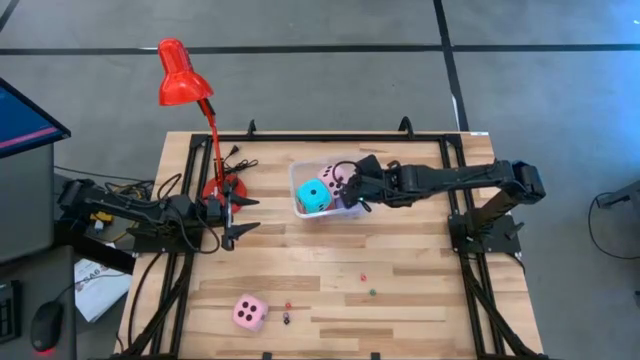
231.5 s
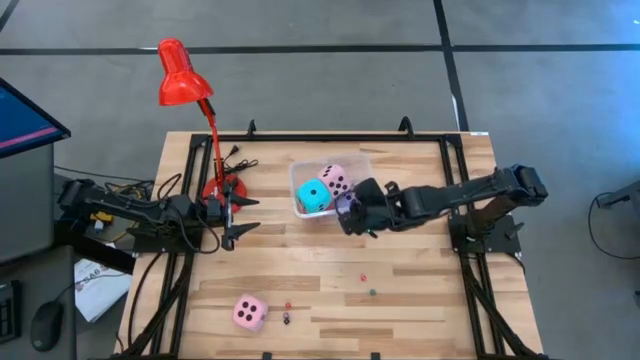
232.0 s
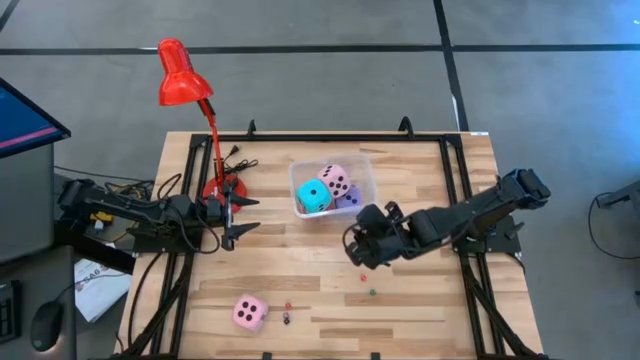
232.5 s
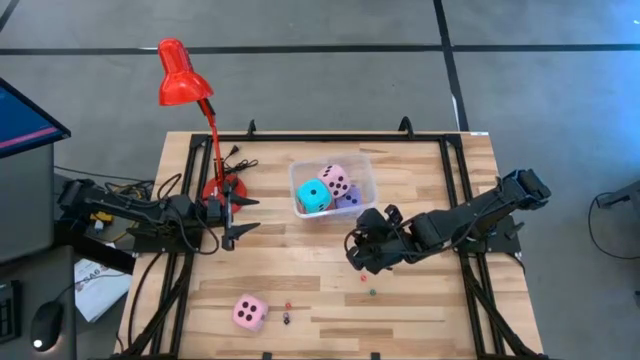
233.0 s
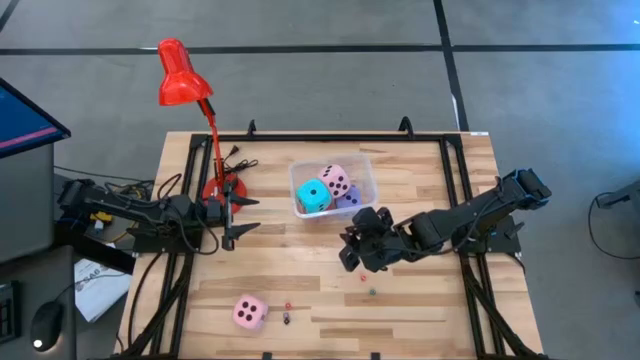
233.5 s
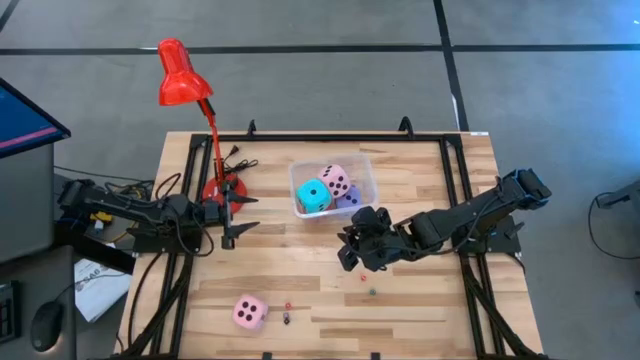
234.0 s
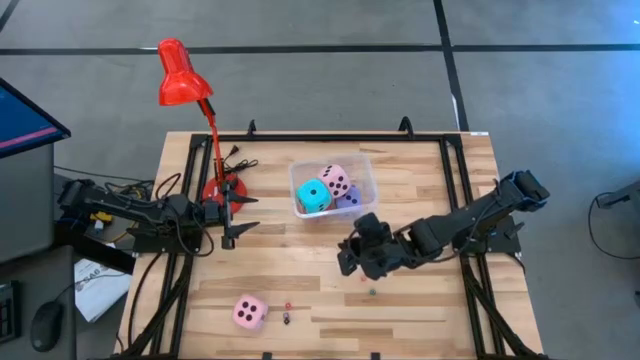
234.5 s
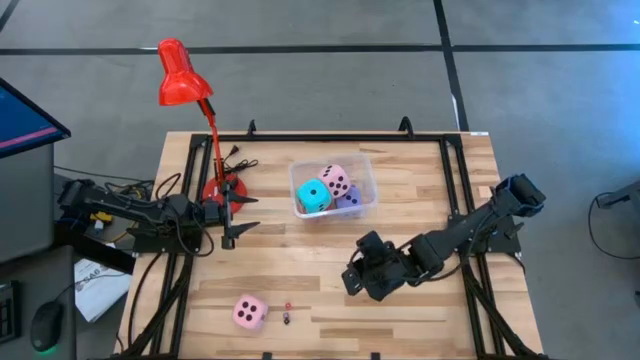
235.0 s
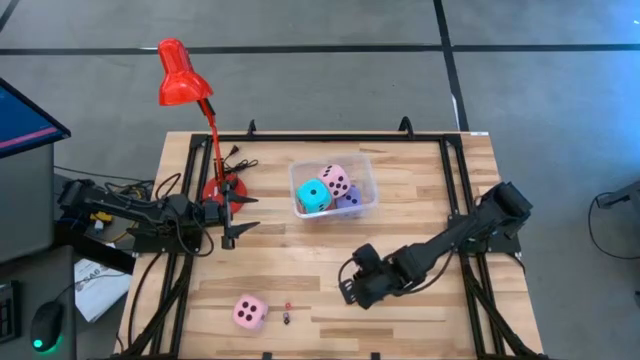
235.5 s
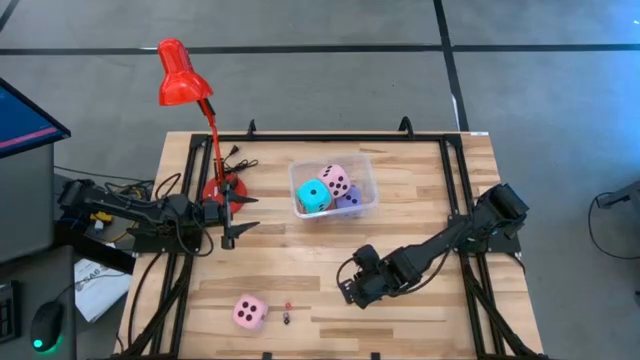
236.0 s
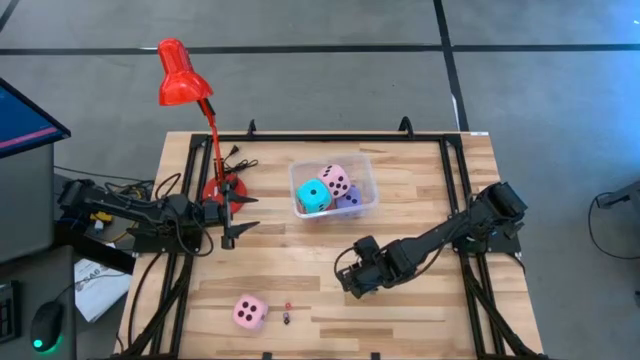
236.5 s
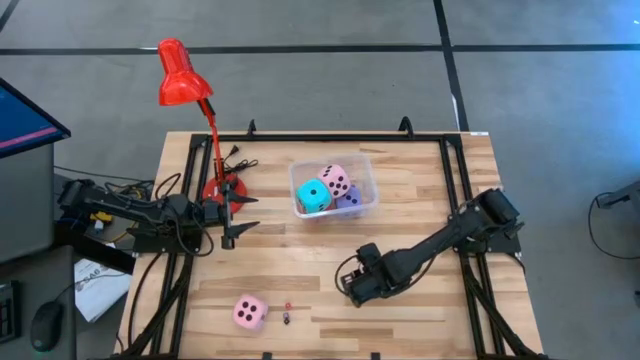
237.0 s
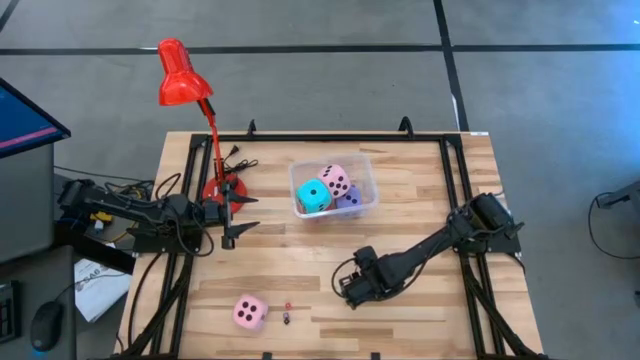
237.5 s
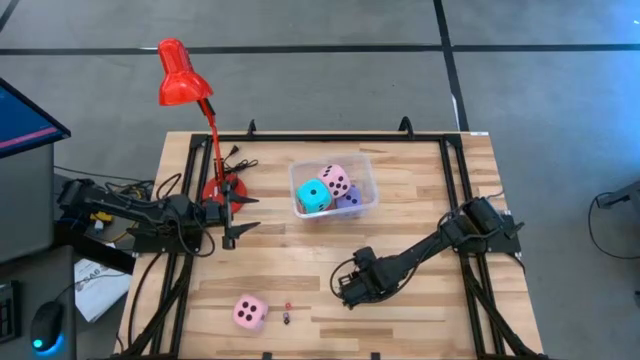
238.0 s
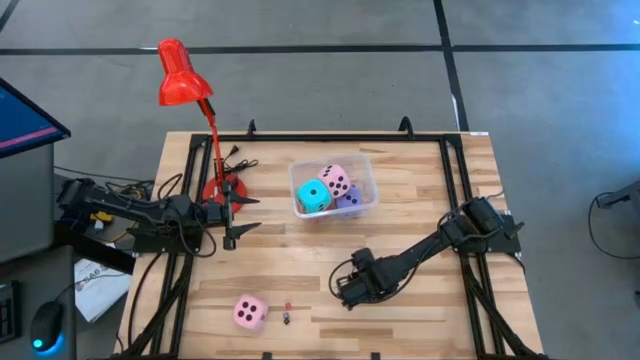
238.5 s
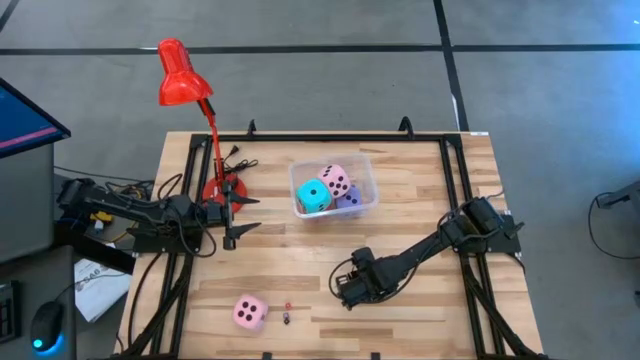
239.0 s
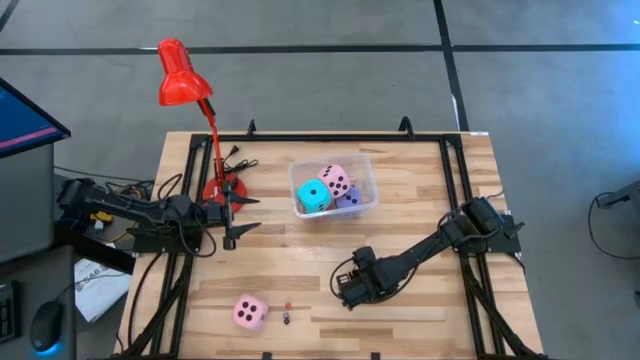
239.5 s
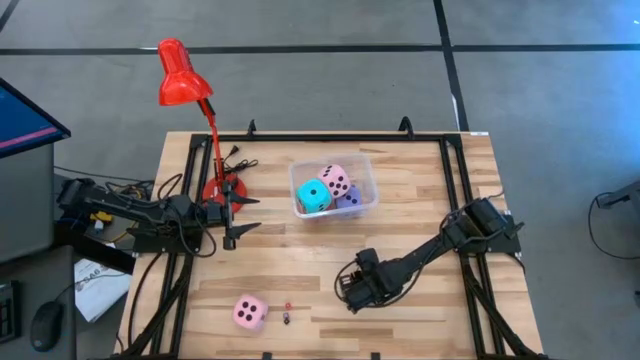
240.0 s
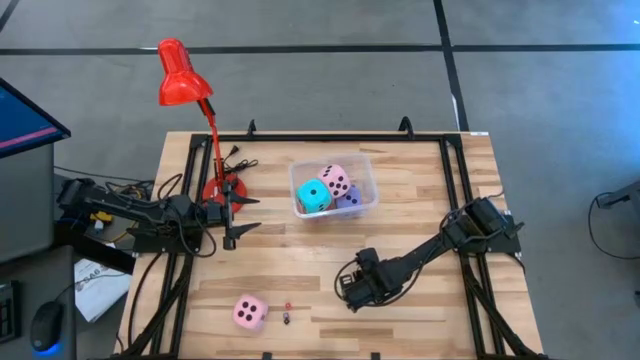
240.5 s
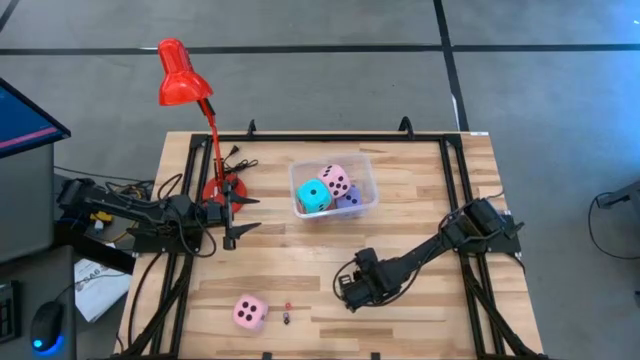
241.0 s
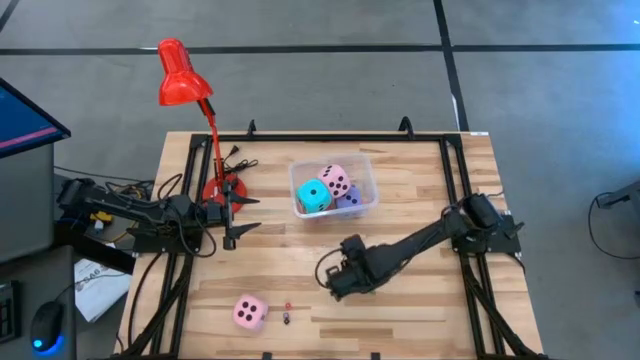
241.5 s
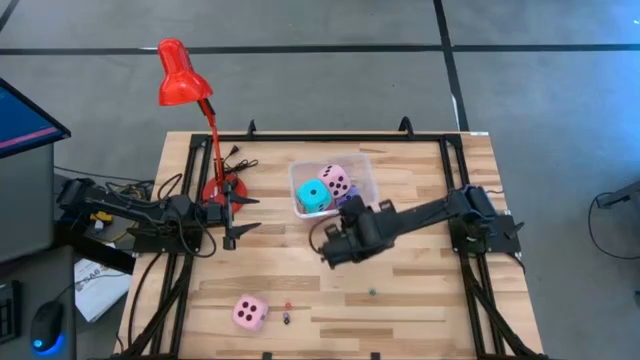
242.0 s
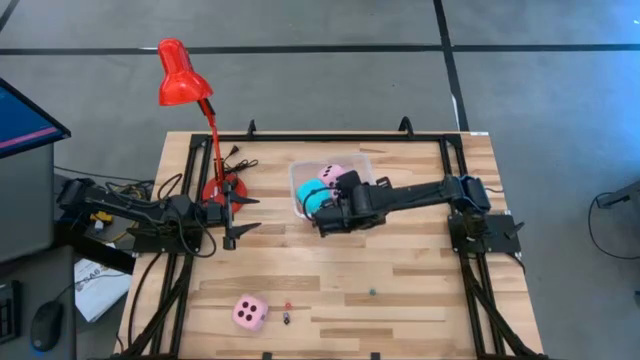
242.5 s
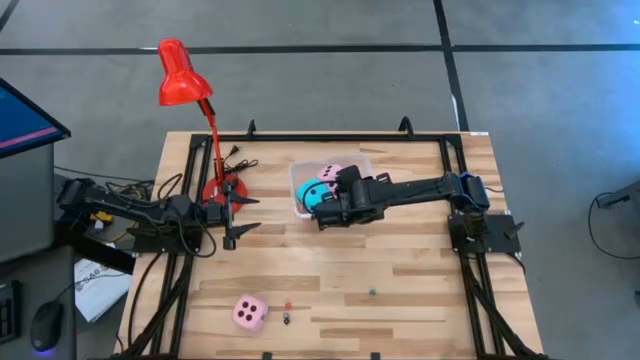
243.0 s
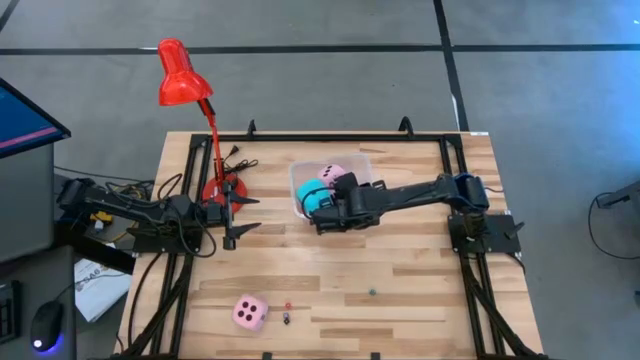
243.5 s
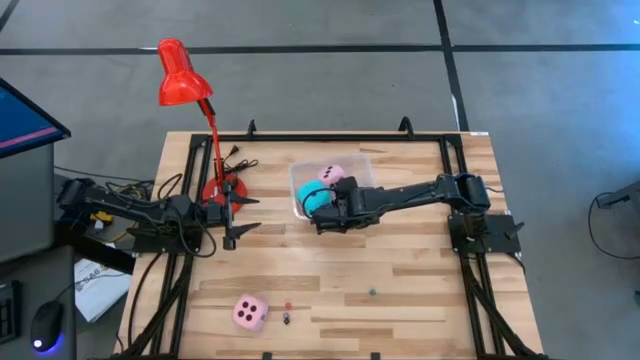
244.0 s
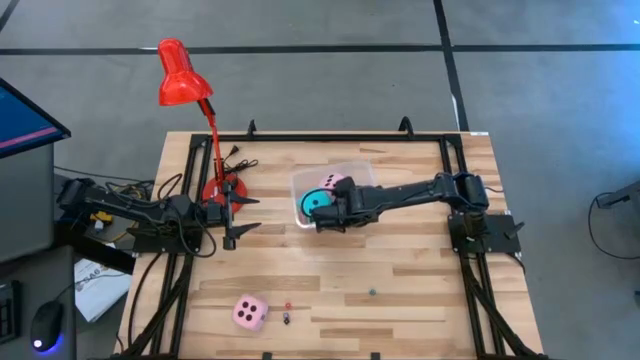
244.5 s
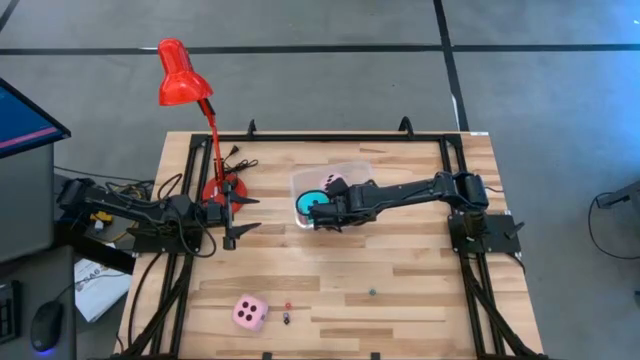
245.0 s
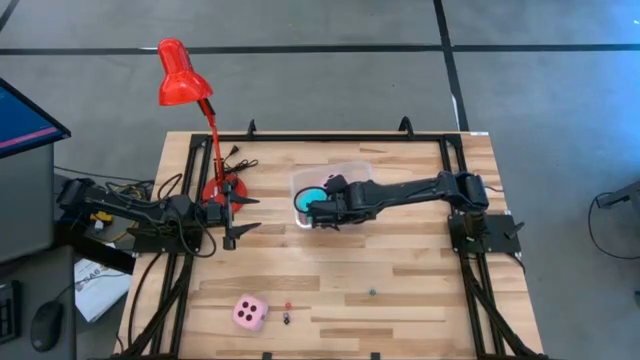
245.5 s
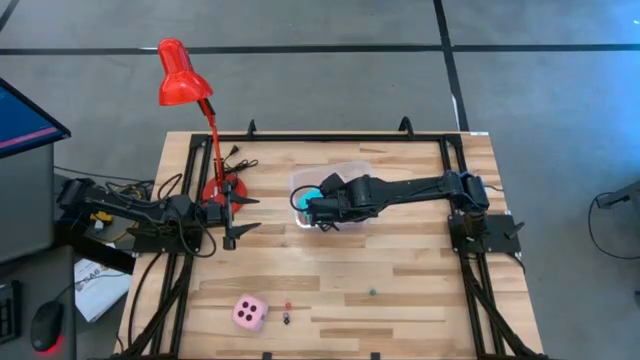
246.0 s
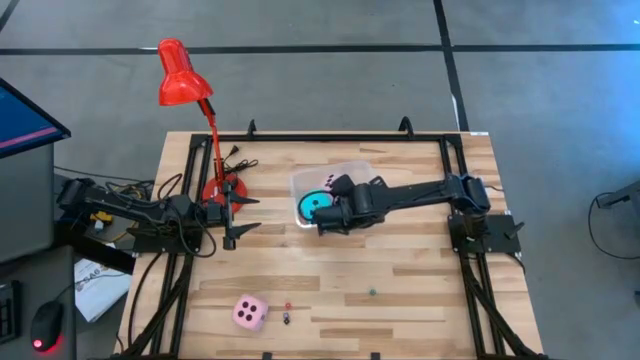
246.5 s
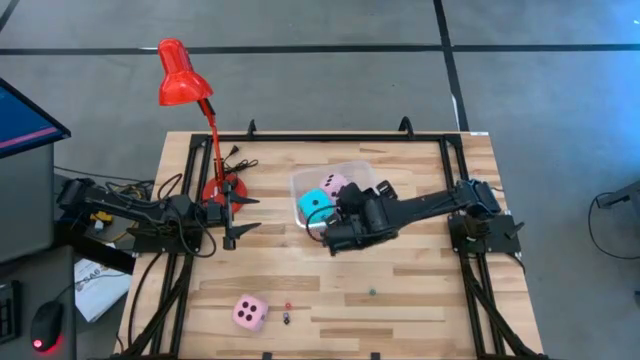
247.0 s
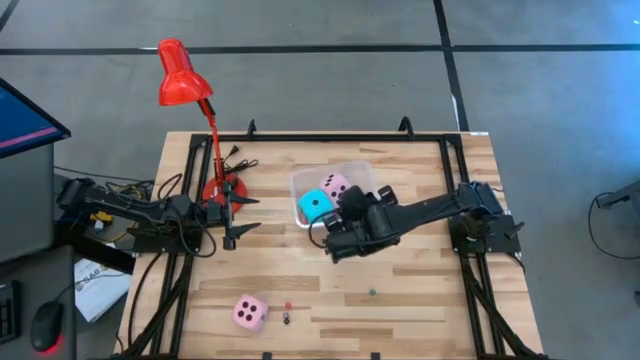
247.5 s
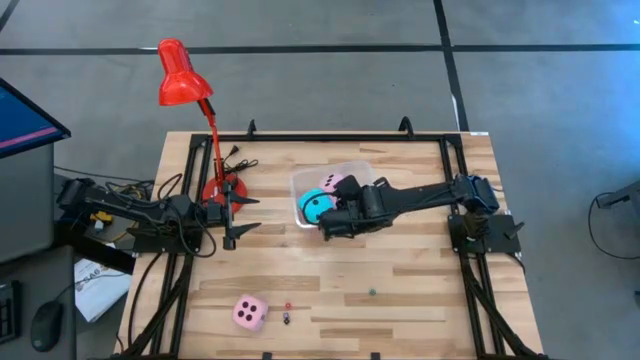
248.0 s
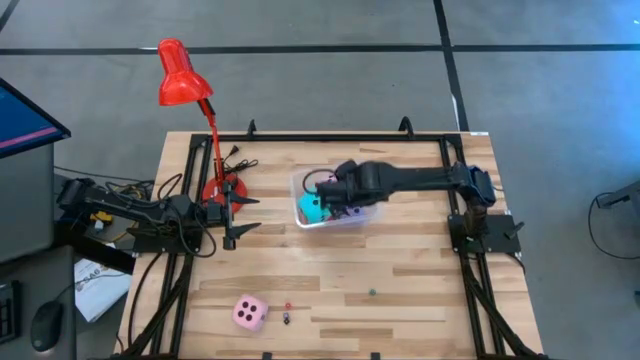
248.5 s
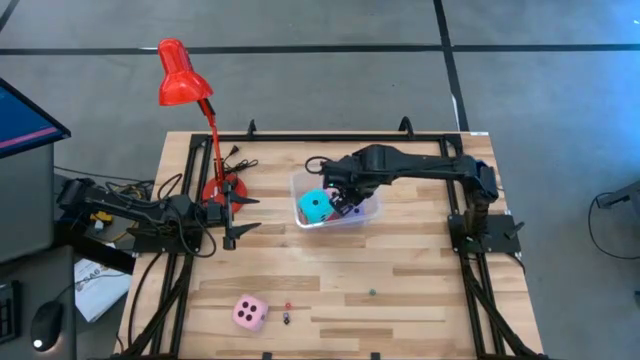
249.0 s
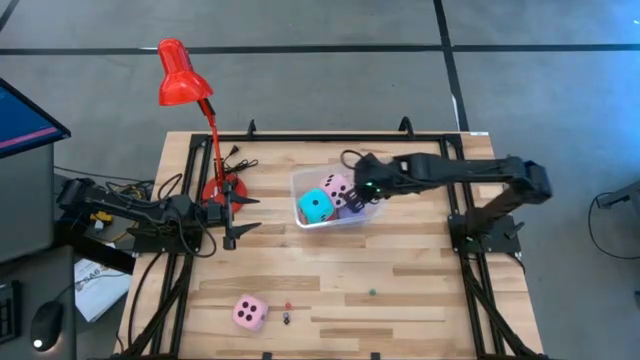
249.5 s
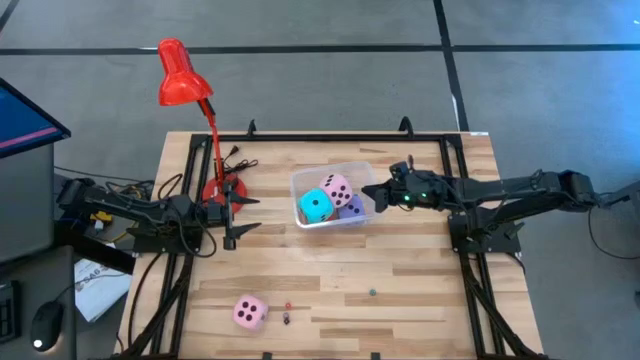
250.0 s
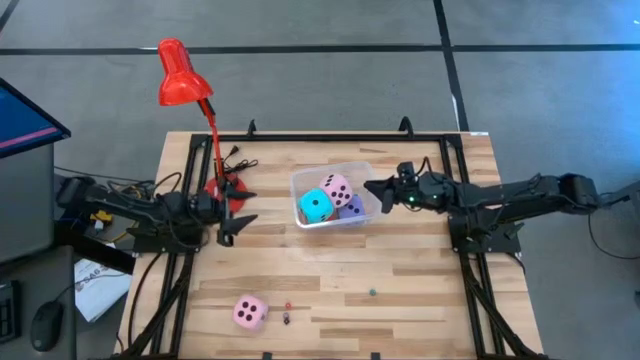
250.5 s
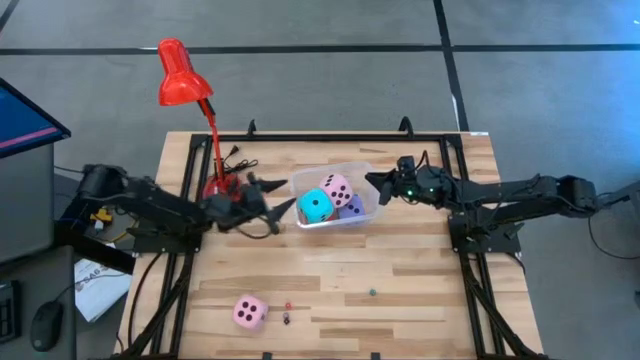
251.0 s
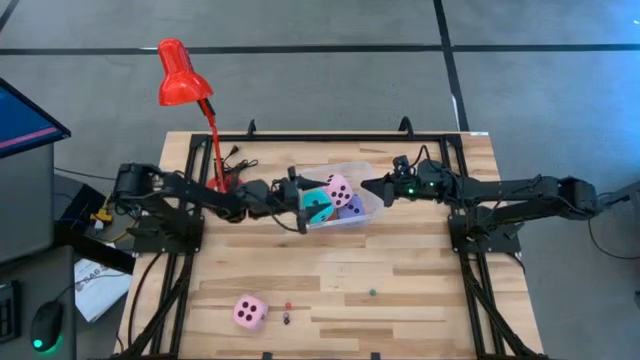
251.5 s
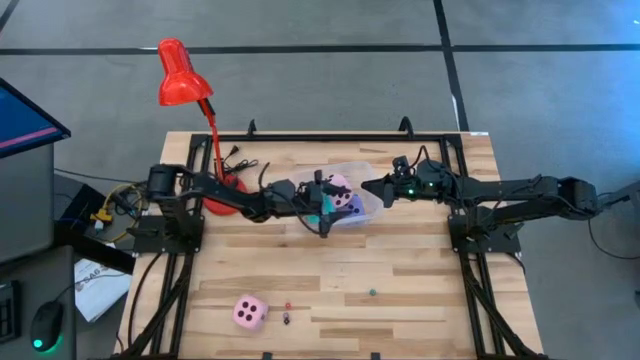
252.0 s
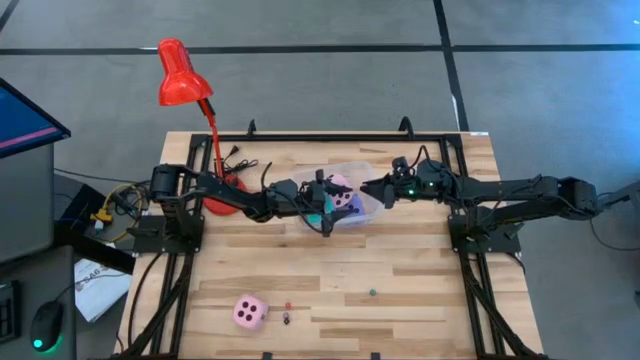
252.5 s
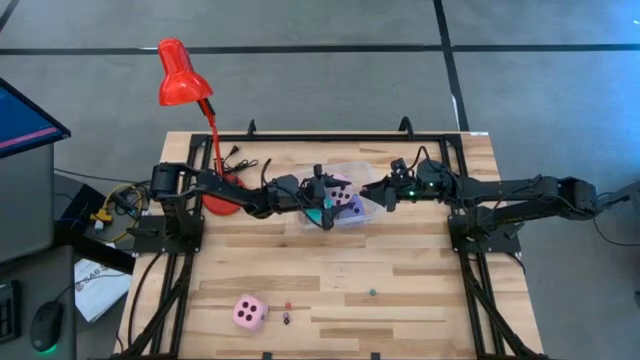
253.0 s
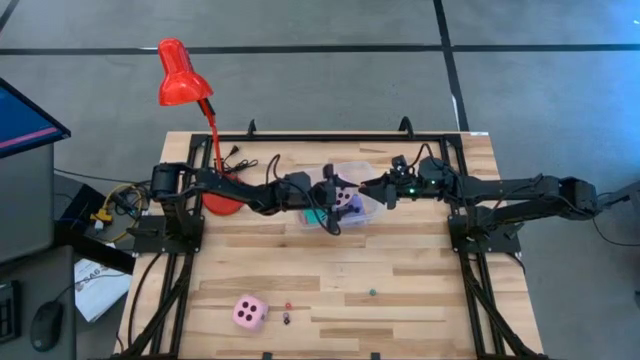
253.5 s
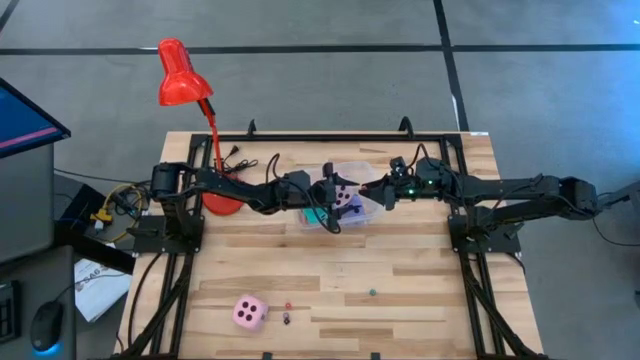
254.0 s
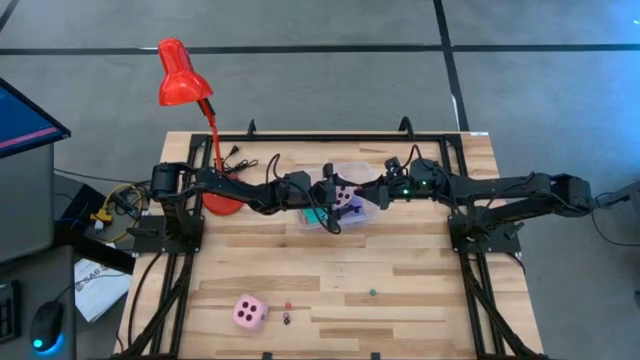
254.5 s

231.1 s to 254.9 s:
Task: Pick & Place Dice
Put the small red die into the transparent bin
